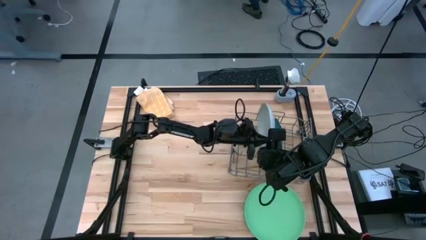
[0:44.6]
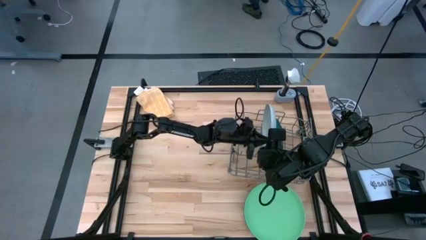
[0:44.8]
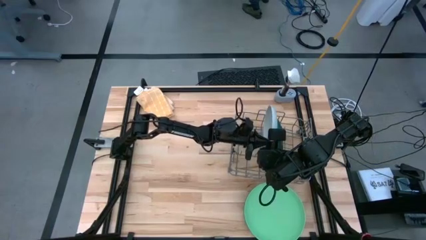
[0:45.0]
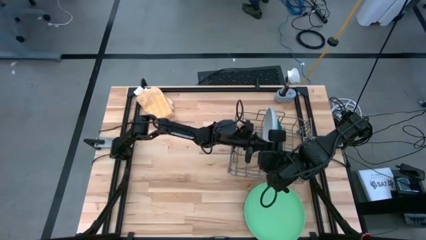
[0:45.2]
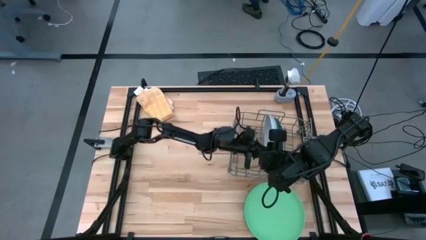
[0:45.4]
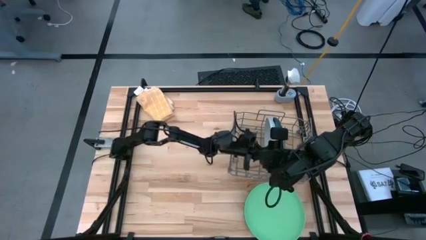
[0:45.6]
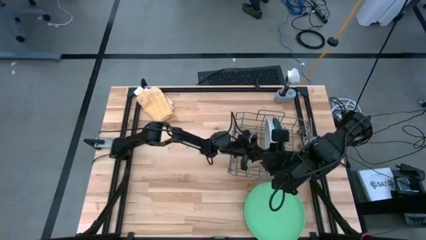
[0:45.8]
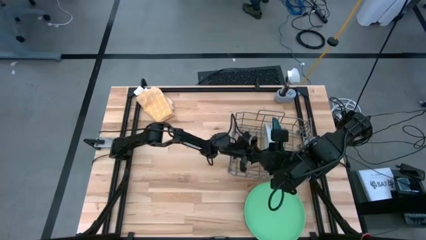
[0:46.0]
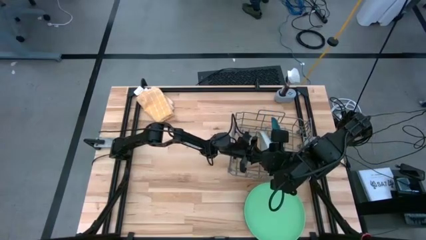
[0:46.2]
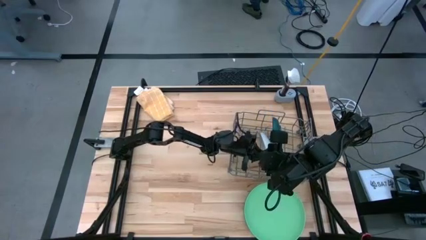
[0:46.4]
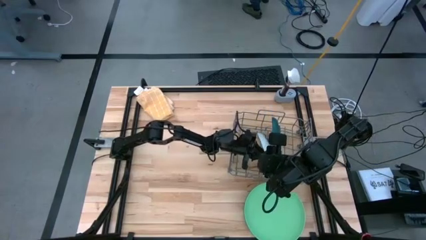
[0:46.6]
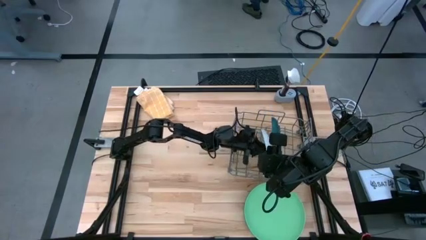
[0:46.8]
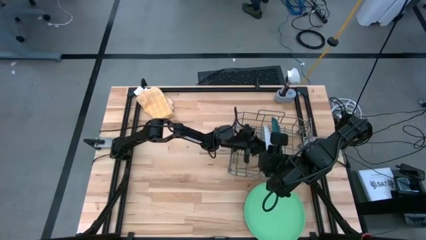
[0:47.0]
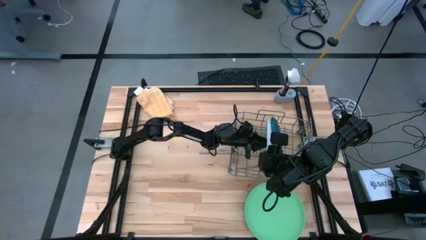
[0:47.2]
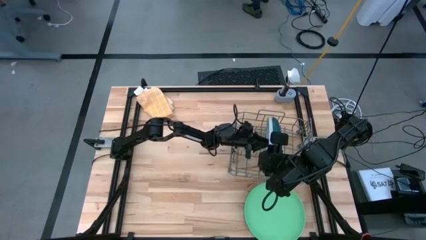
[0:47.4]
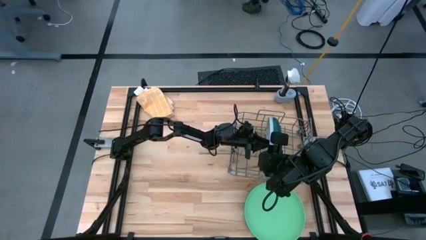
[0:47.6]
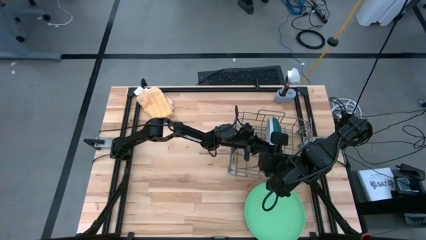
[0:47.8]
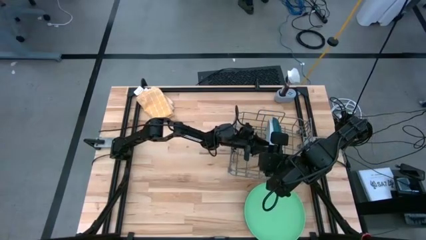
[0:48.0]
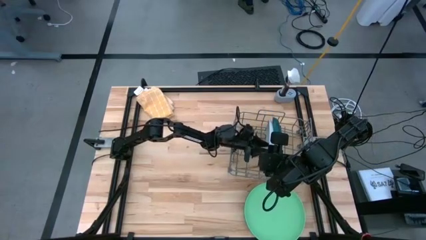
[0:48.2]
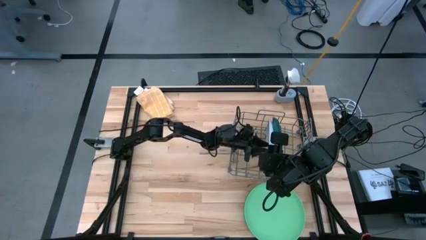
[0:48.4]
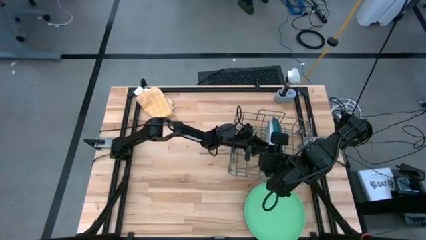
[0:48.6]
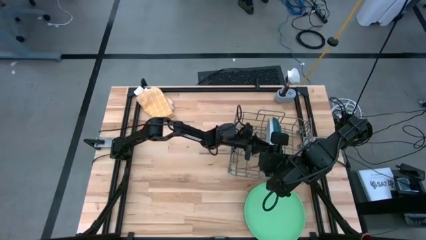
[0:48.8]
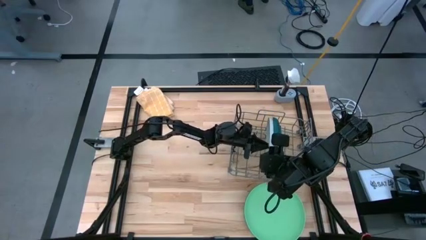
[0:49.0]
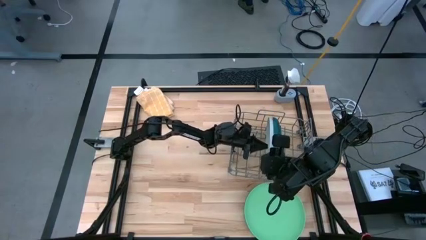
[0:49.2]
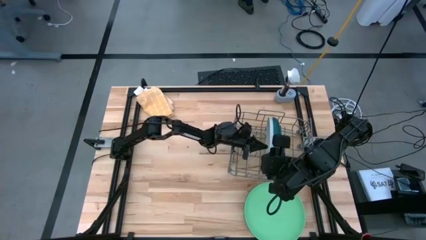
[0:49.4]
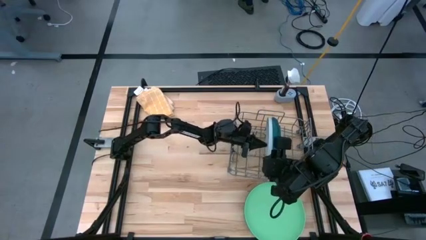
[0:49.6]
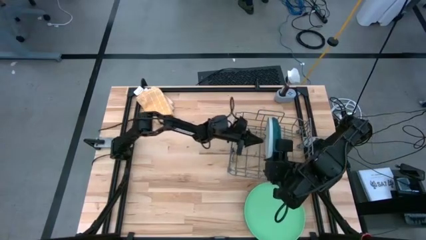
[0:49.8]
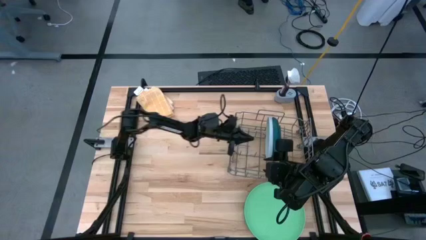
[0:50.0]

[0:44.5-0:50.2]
Task: Sort dishes
Put the white plate in the dish rack

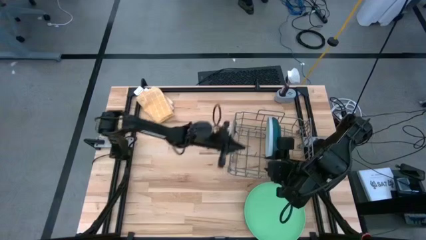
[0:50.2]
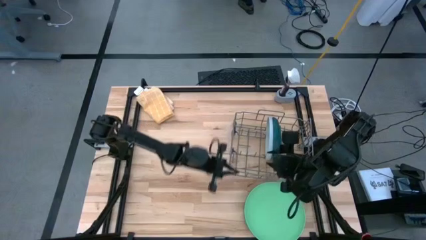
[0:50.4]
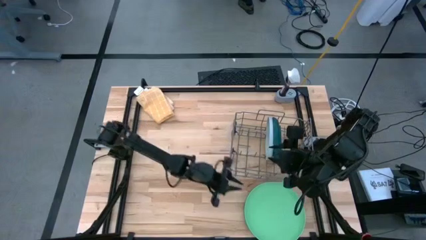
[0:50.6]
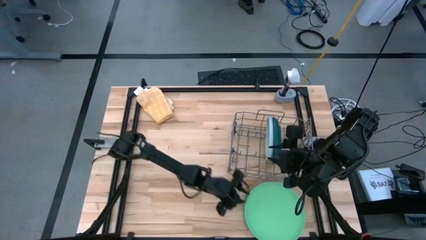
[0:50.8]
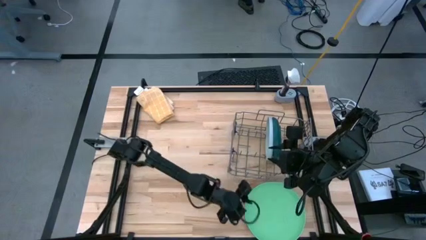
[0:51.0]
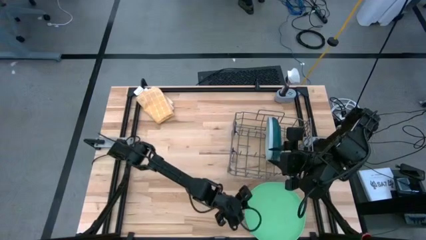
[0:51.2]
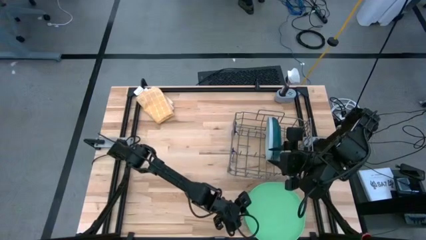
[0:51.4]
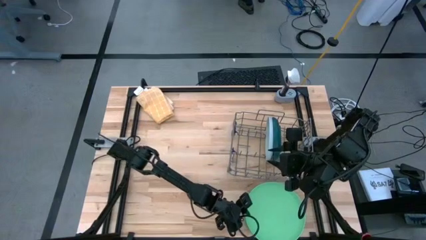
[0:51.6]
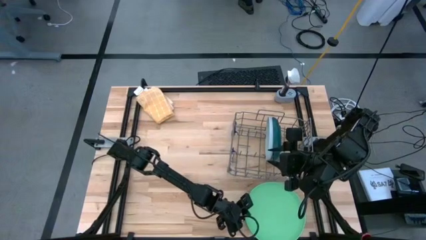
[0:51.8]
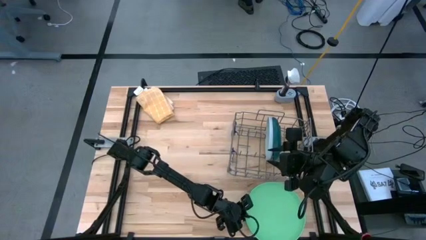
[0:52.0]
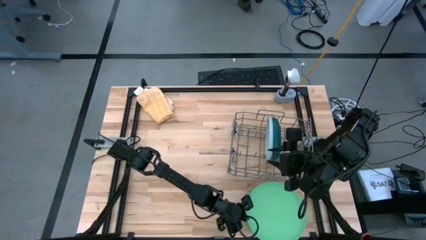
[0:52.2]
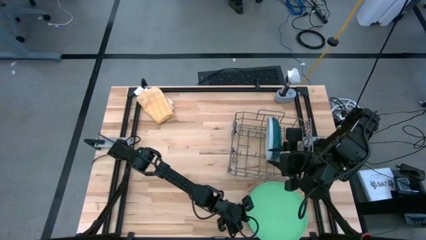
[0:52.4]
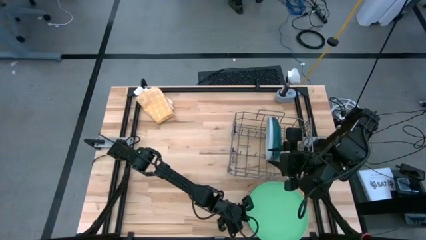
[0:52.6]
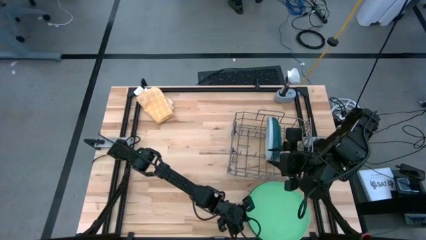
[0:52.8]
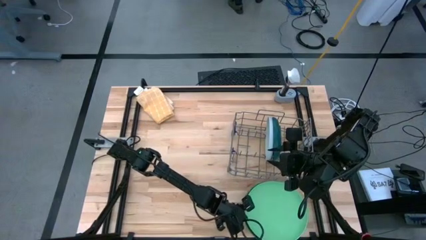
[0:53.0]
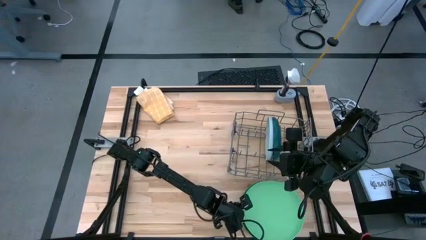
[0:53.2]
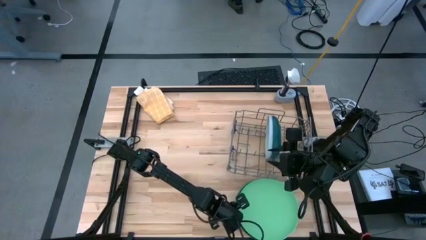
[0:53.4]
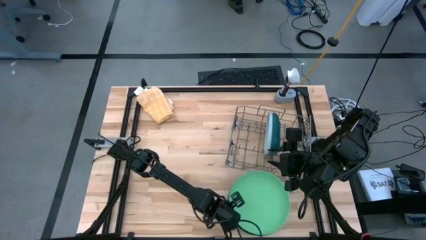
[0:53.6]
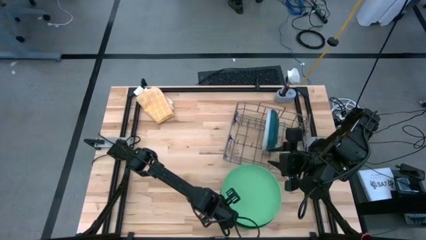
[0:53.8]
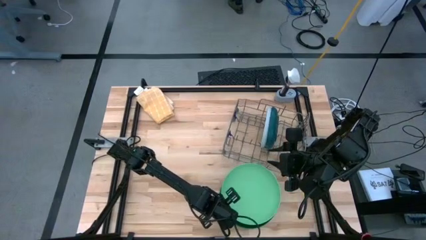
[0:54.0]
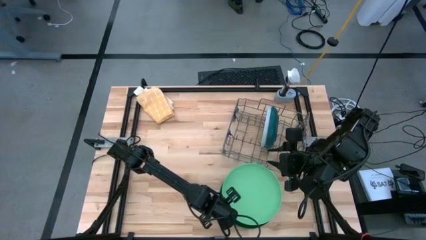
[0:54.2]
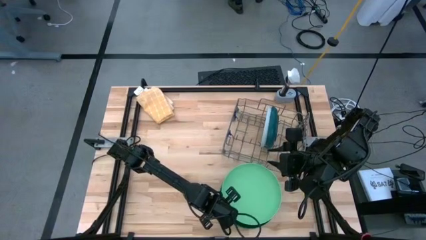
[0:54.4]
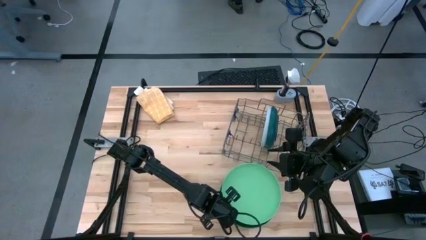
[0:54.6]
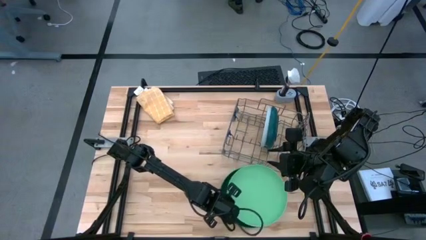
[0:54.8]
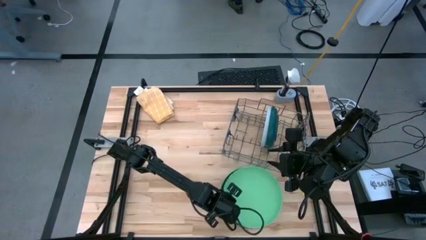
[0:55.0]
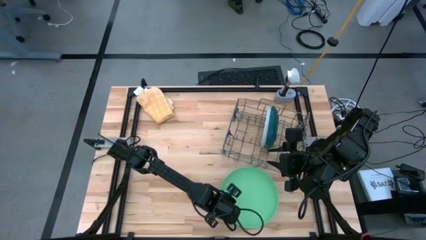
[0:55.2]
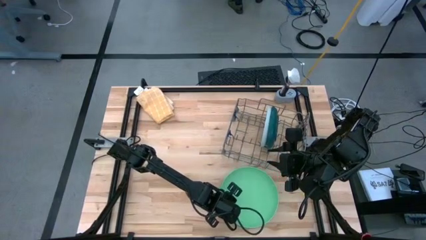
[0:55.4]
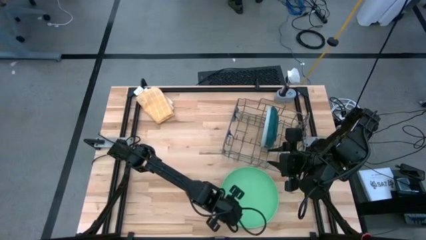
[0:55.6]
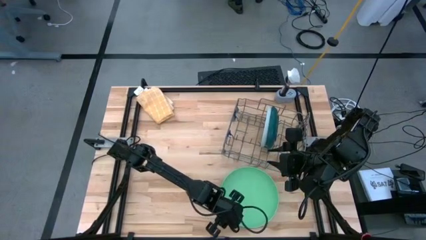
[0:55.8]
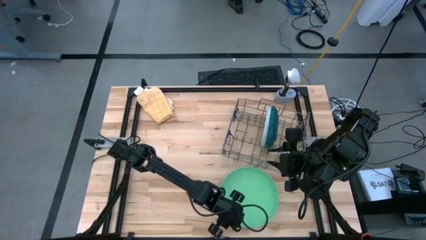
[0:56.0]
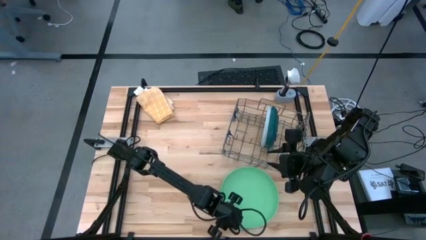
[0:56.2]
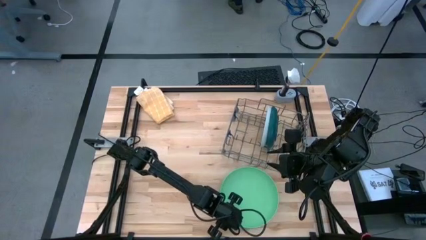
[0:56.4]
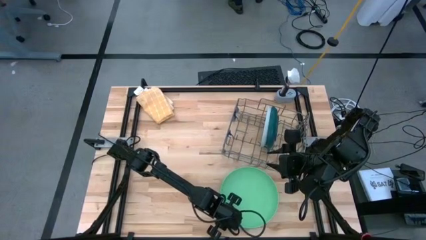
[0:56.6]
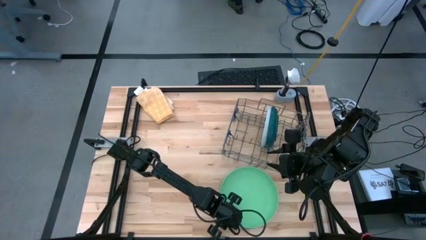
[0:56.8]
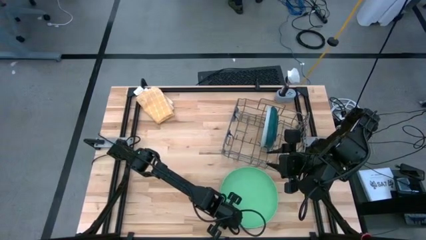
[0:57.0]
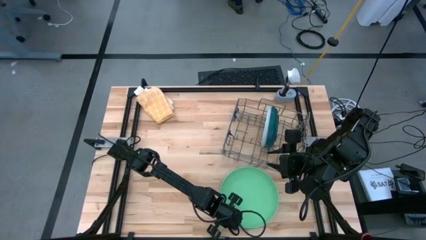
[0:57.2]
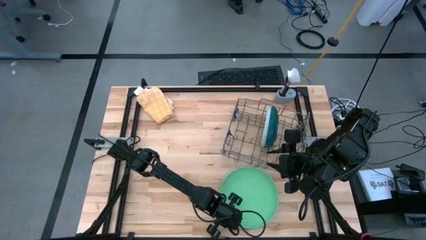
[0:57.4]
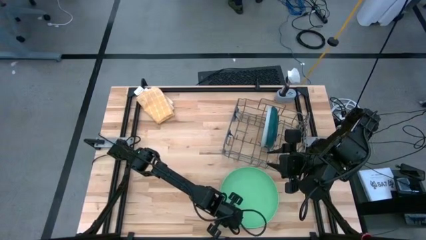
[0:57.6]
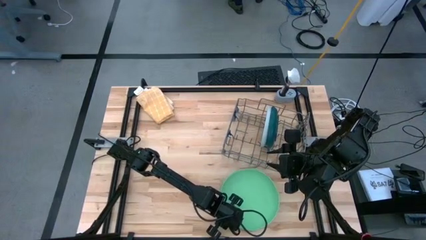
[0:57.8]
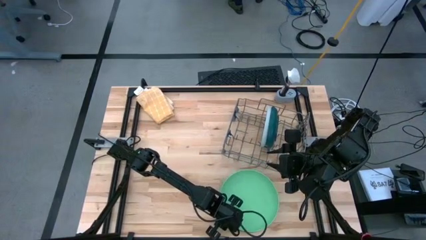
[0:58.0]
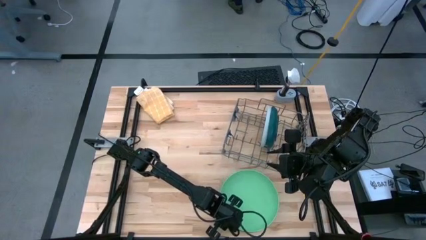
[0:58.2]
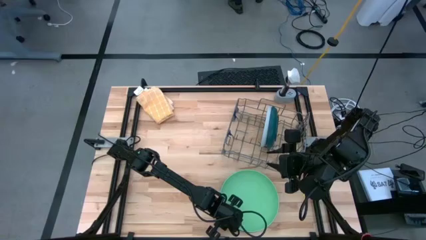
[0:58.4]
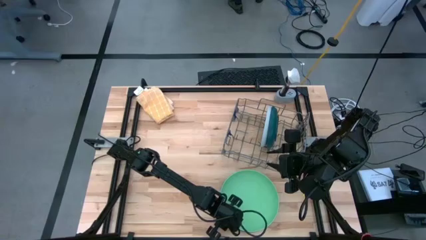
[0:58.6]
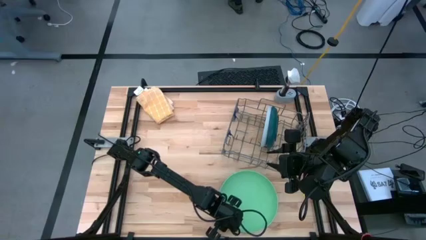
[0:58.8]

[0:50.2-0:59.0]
Put the light green plate in the dish rack

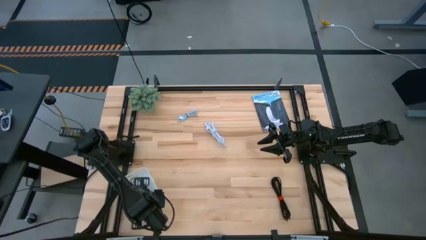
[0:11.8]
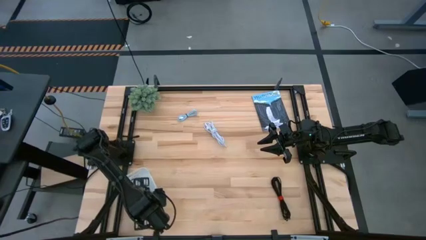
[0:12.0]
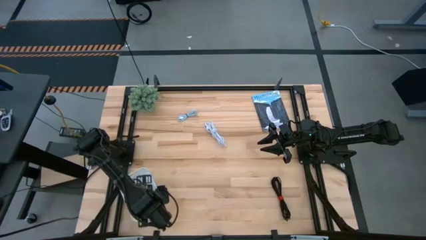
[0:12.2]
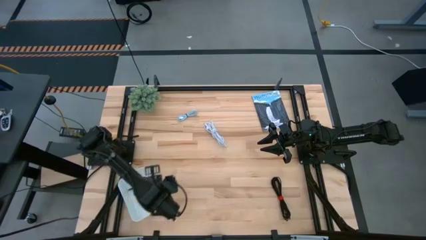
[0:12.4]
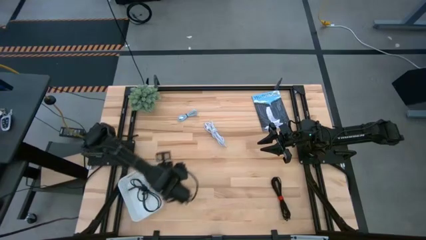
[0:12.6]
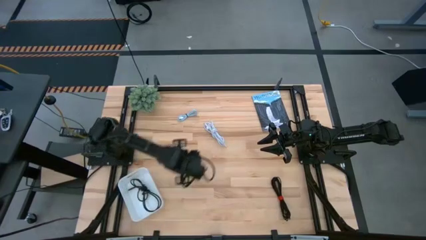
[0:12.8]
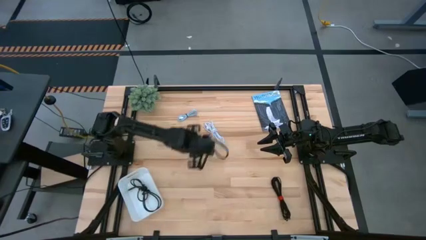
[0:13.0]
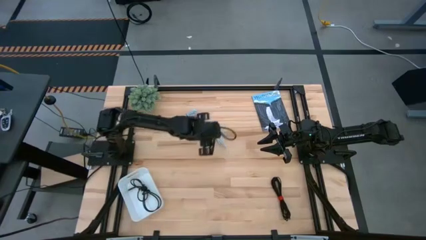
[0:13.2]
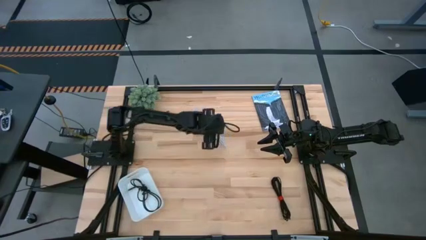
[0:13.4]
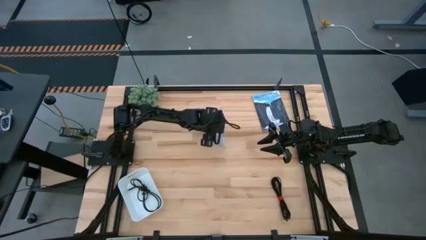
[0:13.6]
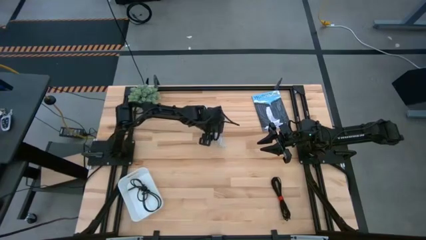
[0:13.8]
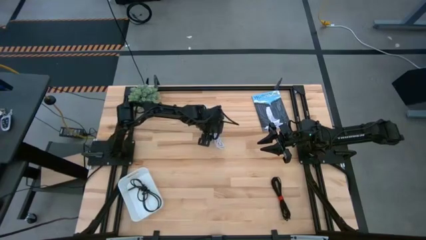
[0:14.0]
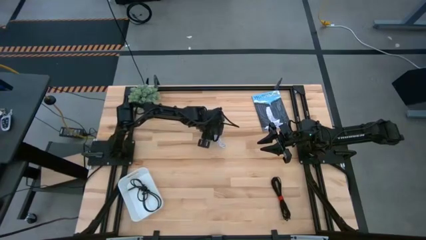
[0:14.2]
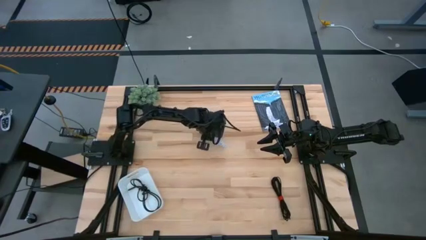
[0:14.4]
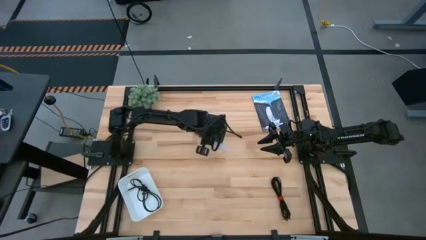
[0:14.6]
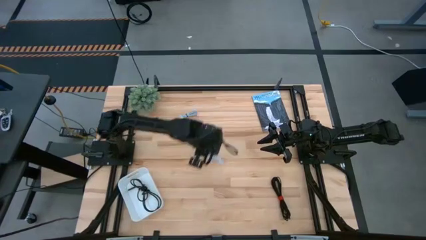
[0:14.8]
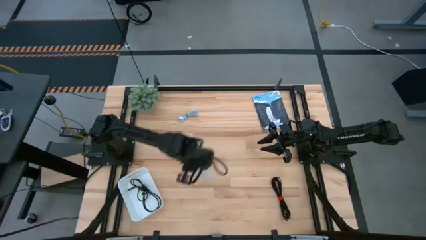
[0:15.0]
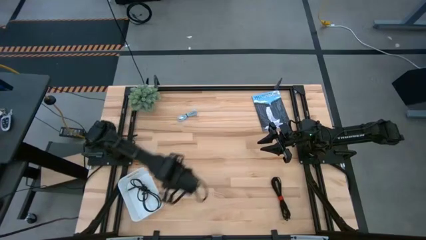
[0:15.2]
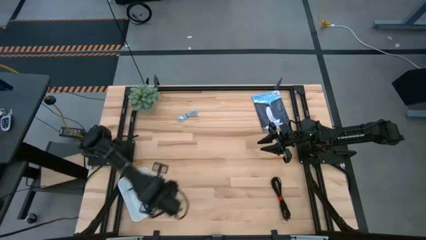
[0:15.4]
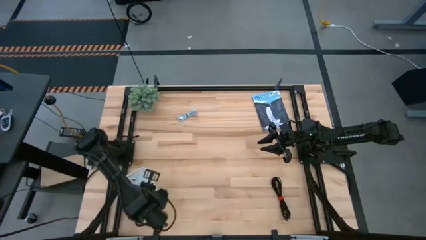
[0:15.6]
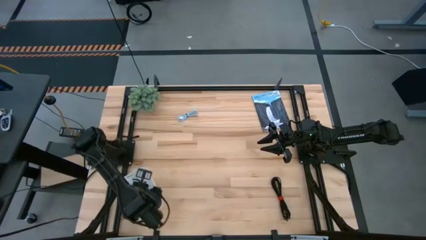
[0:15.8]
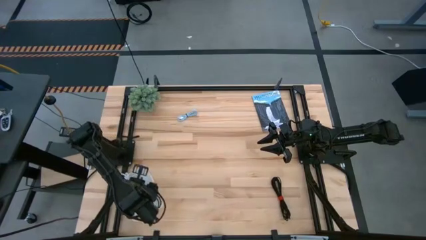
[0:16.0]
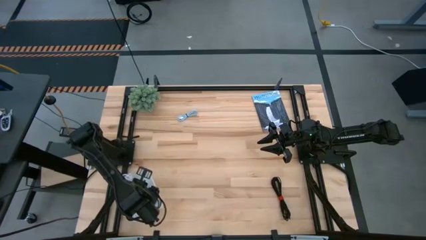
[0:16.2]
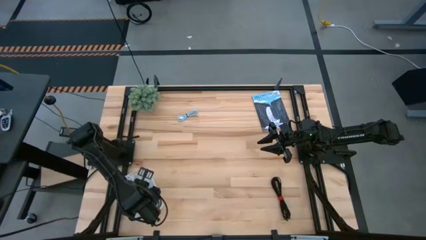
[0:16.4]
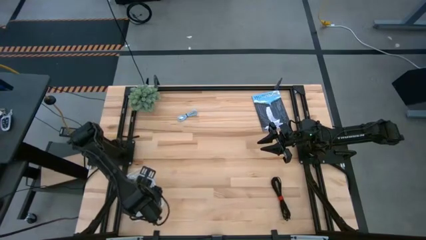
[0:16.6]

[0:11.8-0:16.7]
Task: Pick and place USB-C Cables
Put the usb cable wire into the white bin
